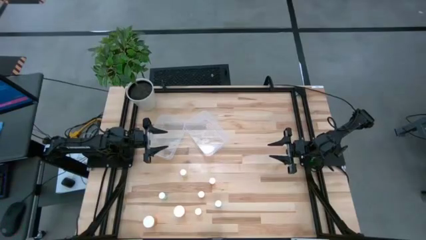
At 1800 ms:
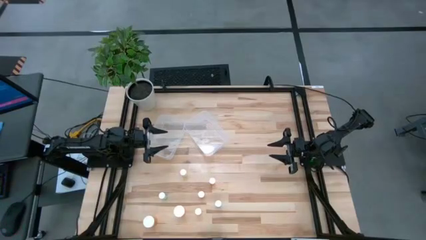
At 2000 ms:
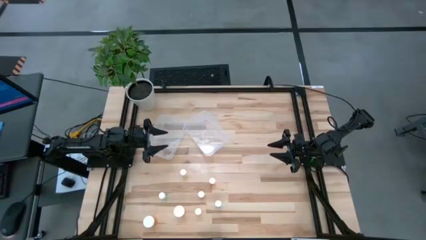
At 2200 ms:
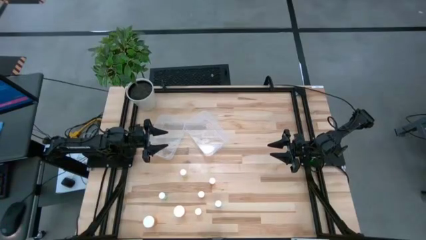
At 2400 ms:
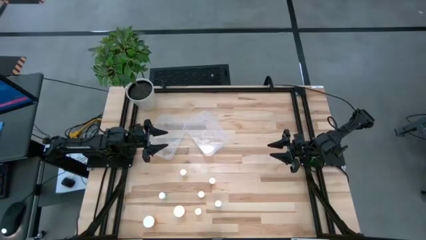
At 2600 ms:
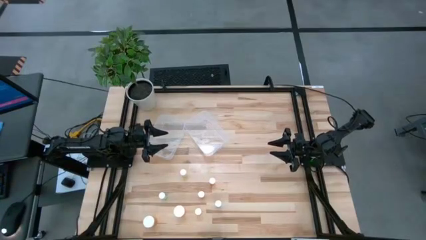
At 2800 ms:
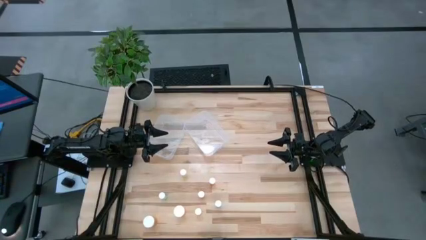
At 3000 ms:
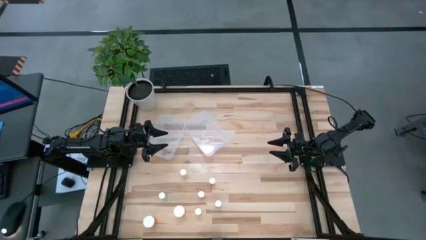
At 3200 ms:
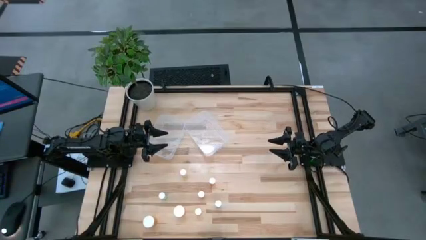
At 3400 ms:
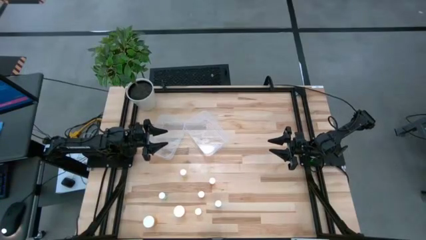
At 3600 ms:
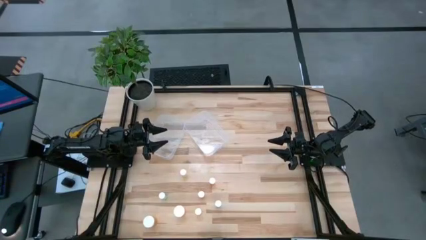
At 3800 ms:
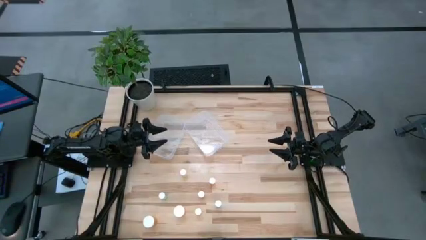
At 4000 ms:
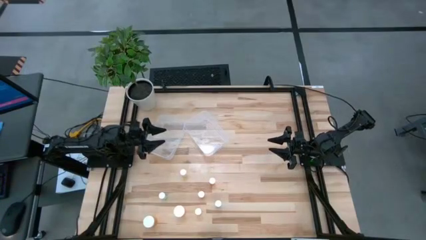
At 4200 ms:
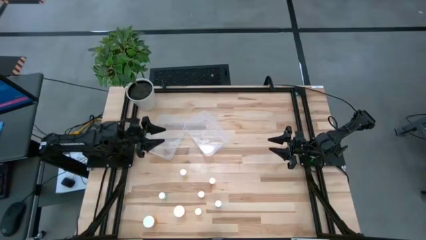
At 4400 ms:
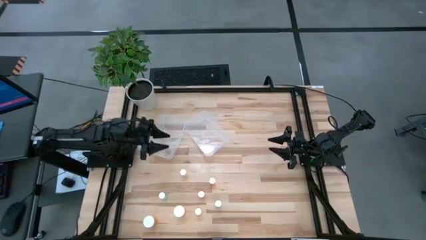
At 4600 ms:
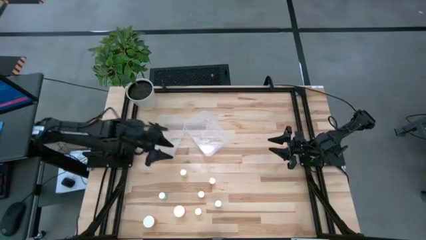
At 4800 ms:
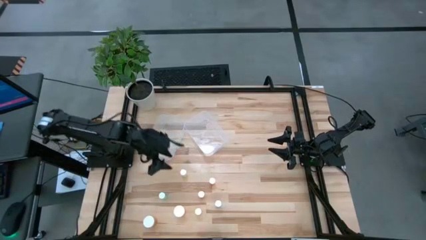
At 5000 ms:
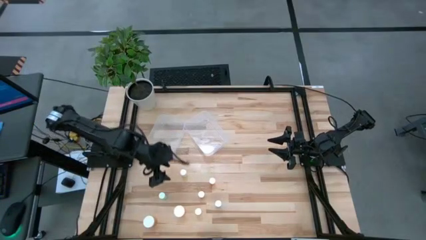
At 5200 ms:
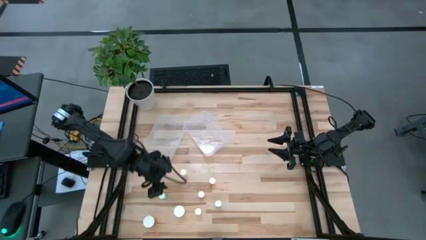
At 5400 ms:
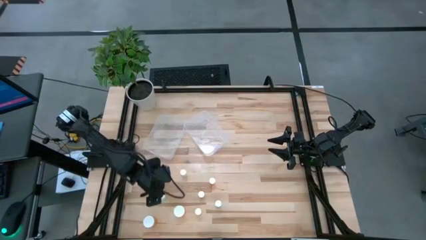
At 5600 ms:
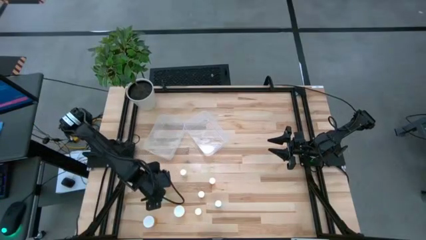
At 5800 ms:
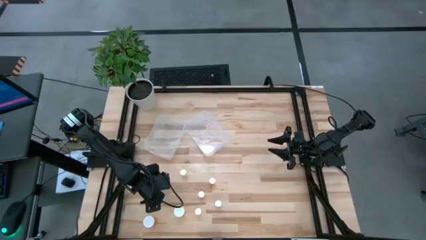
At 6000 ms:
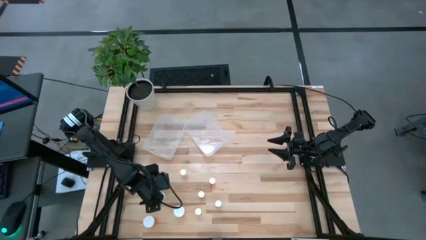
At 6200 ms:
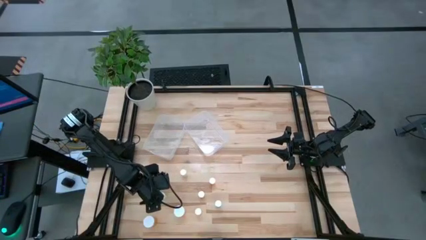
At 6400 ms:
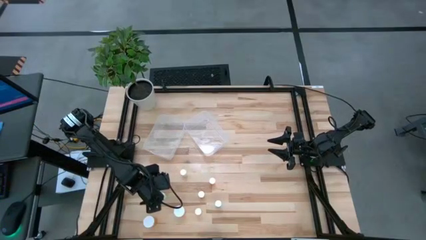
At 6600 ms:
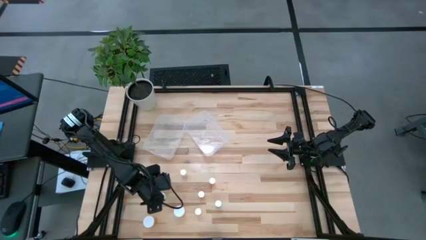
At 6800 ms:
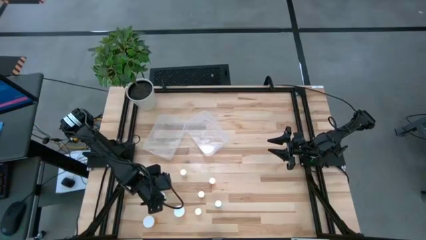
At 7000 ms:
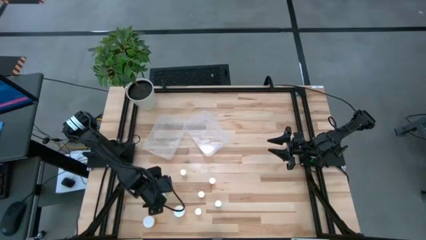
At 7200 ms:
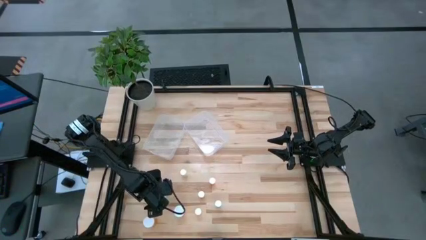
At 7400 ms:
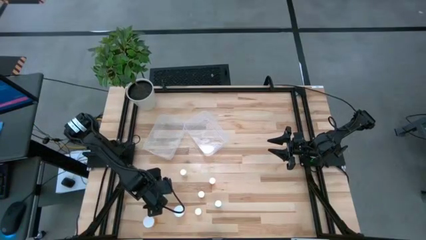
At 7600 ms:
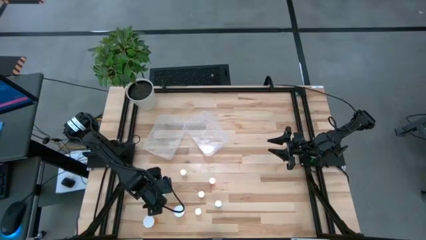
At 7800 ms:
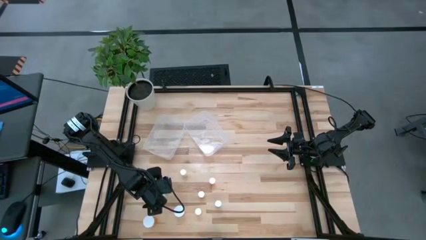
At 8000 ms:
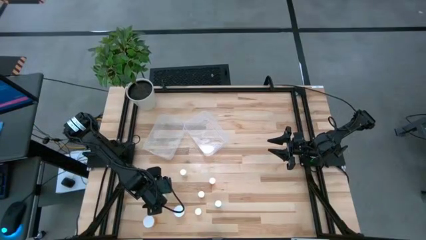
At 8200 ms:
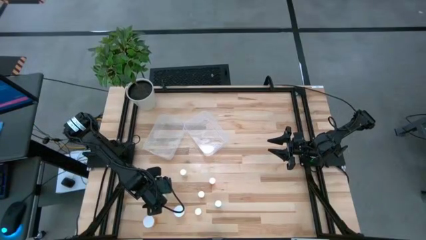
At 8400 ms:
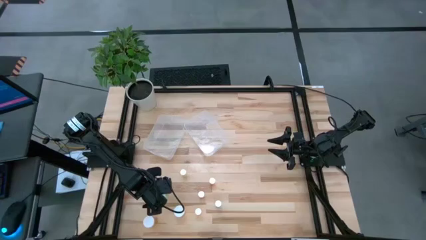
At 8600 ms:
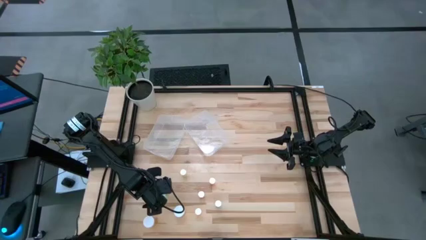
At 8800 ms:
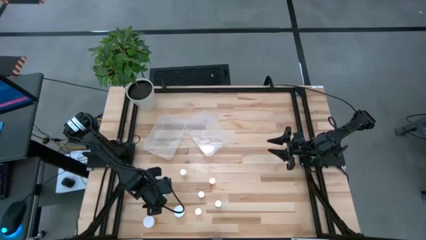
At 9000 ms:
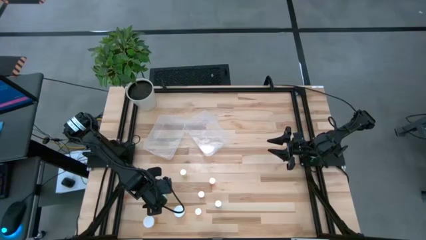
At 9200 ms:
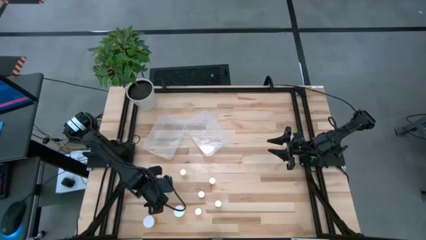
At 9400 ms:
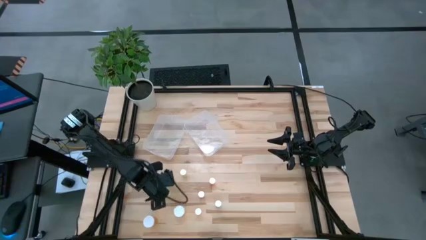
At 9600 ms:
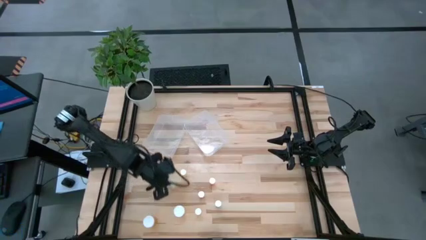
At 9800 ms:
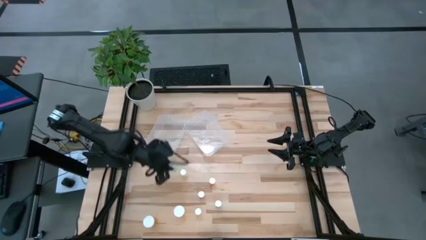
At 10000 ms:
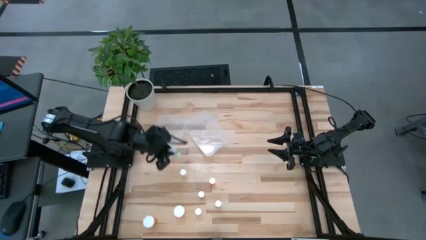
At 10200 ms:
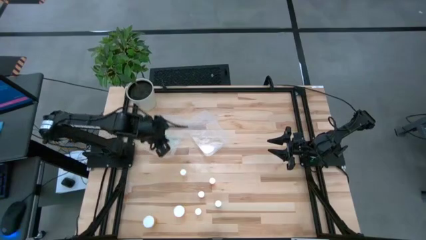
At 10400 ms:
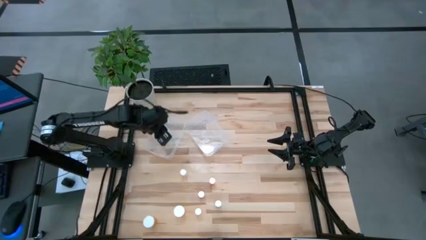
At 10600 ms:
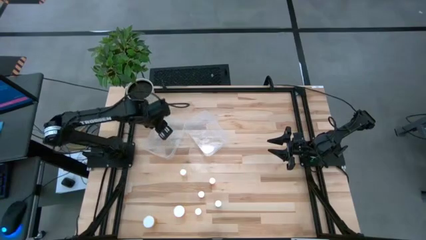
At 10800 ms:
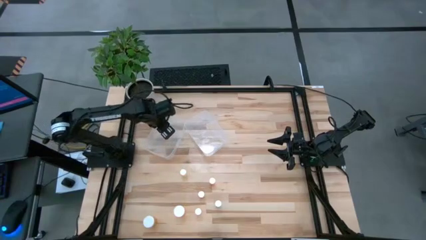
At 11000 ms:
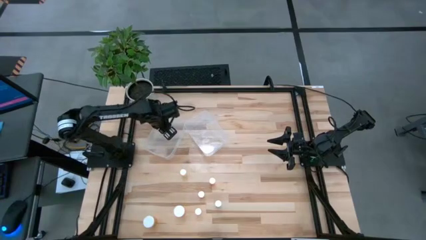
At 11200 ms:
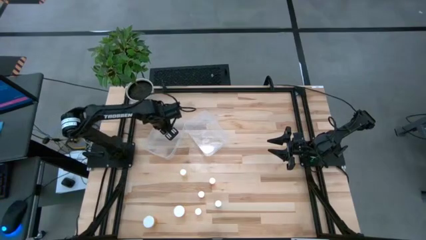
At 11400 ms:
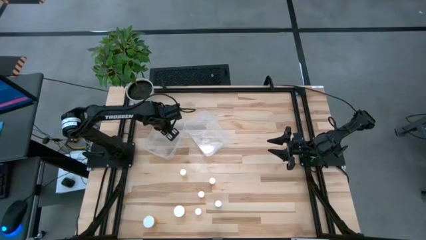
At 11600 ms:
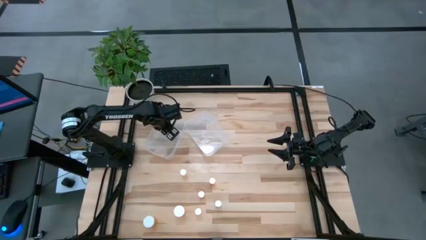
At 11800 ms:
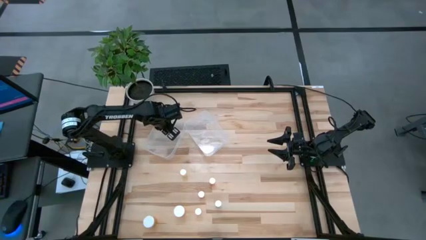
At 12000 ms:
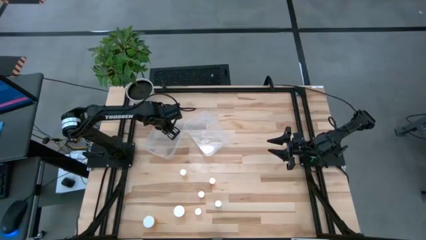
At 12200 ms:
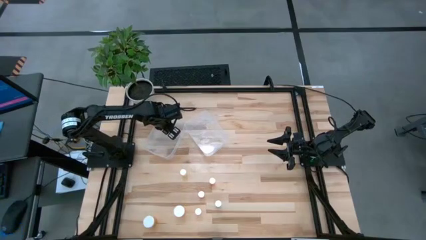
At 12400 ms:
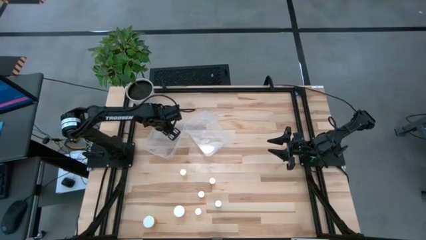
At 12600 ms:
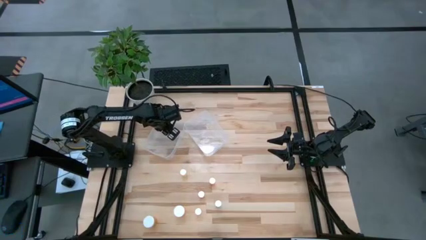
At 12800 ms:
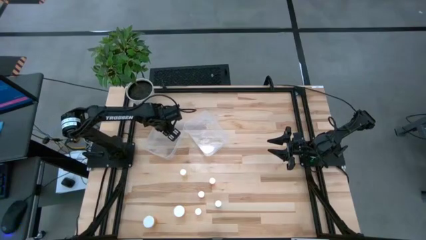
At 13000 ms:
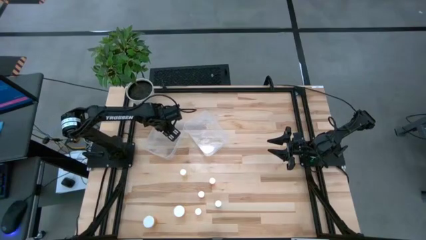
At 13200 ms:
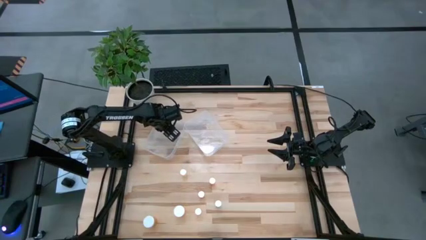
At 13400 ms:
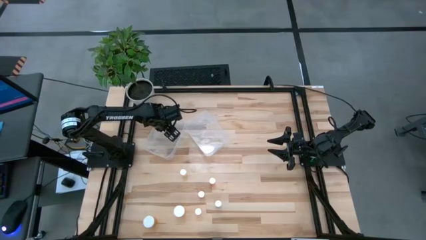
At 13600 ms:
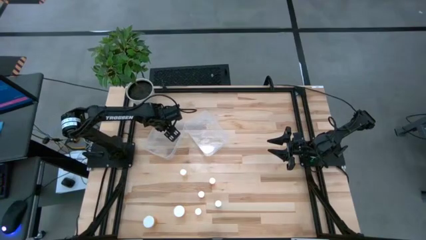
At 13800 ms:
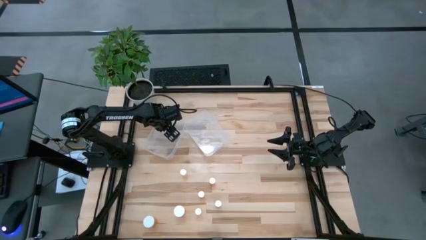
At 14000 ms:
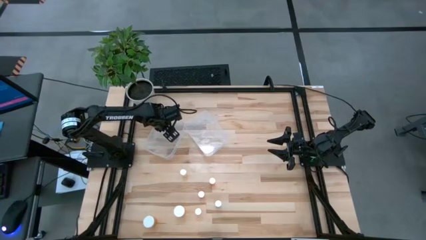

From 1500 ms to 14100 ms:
Task: Pick and place medicine bottles into bin by pill shape (circle, oval)
Put the green tablet bottle into the left transparent bin
